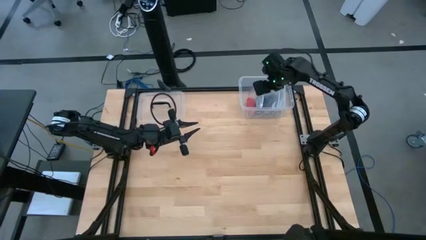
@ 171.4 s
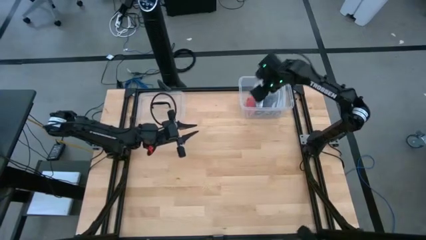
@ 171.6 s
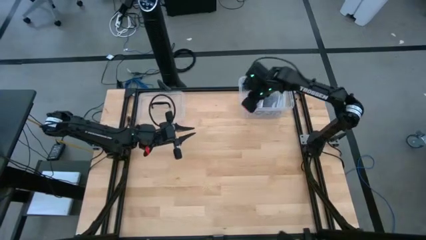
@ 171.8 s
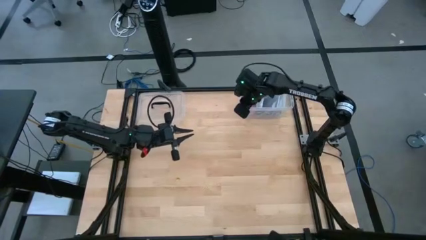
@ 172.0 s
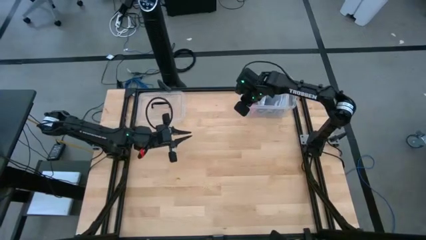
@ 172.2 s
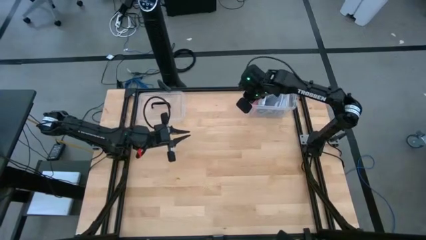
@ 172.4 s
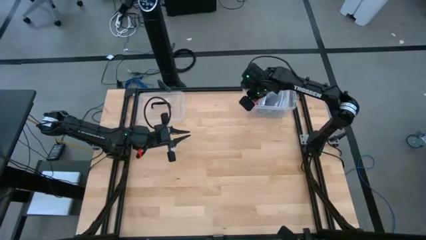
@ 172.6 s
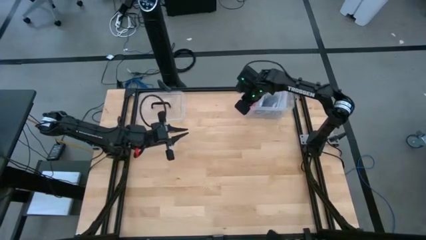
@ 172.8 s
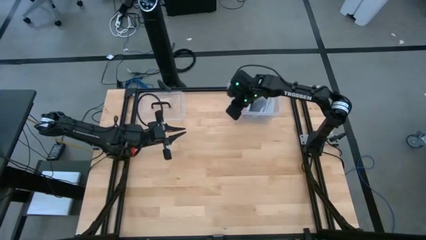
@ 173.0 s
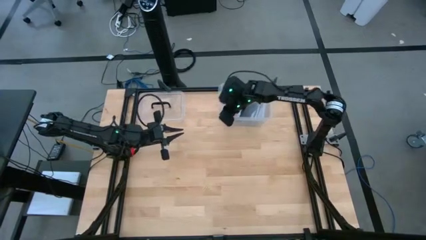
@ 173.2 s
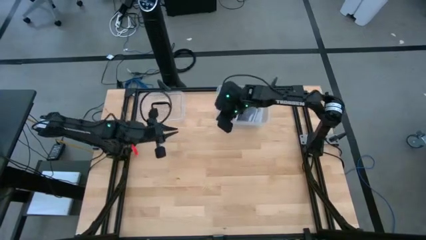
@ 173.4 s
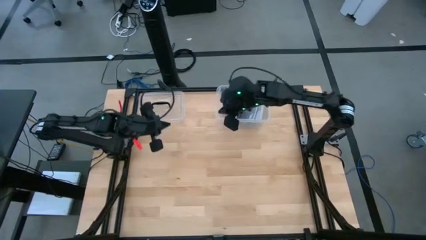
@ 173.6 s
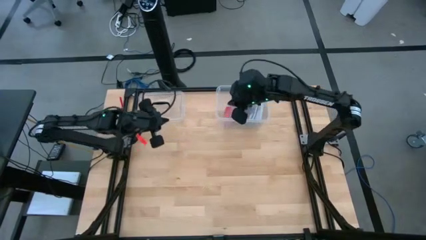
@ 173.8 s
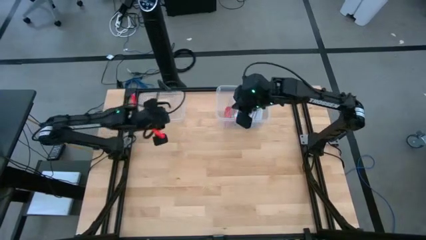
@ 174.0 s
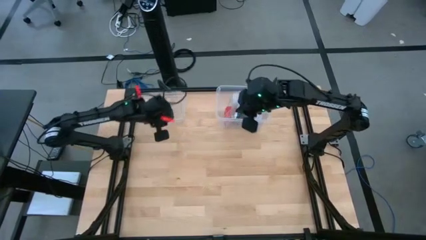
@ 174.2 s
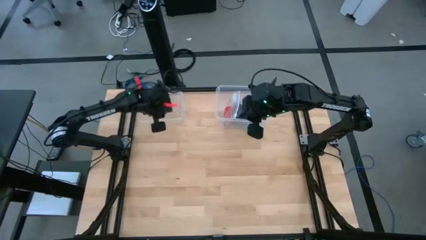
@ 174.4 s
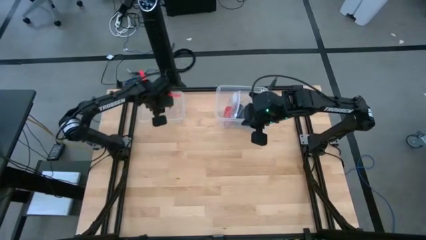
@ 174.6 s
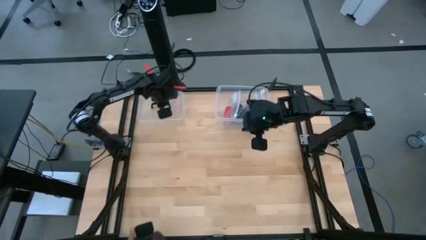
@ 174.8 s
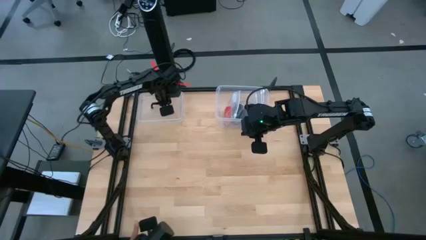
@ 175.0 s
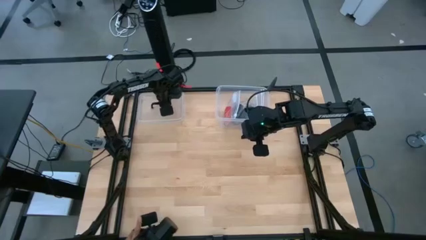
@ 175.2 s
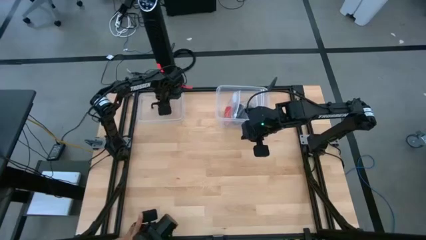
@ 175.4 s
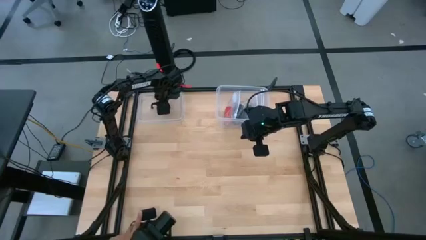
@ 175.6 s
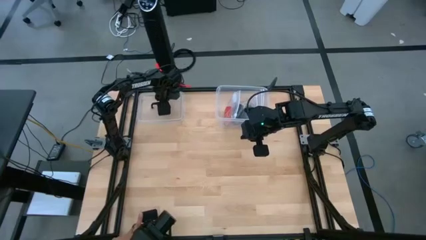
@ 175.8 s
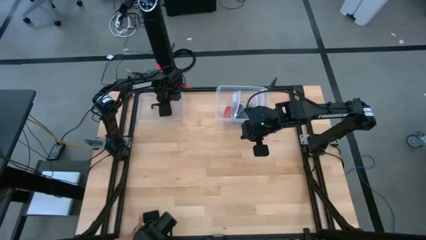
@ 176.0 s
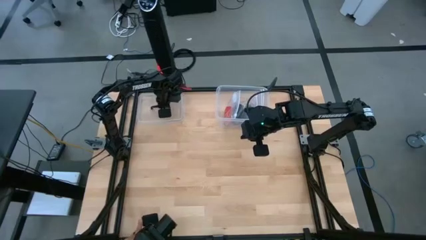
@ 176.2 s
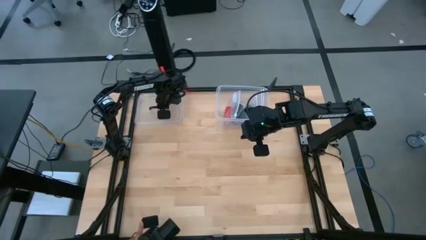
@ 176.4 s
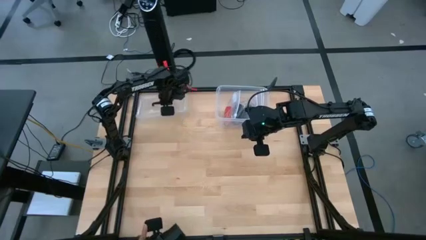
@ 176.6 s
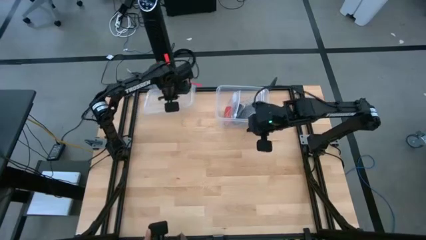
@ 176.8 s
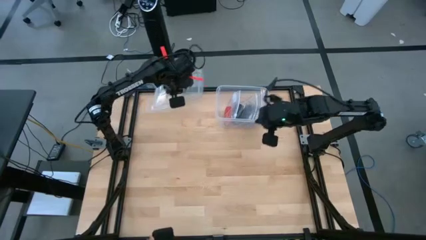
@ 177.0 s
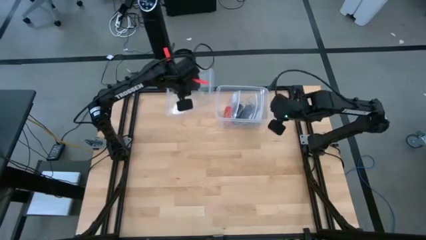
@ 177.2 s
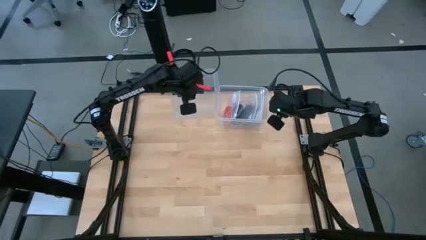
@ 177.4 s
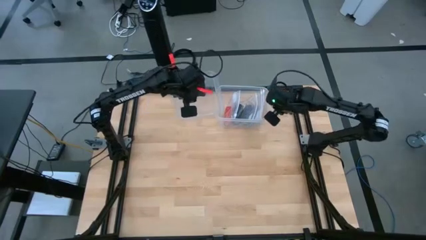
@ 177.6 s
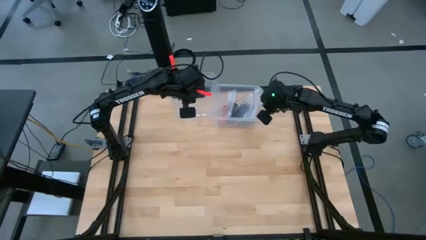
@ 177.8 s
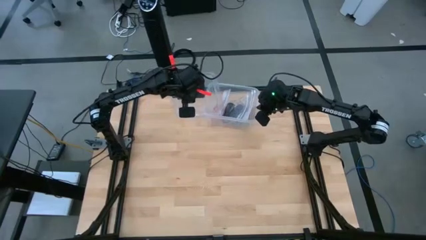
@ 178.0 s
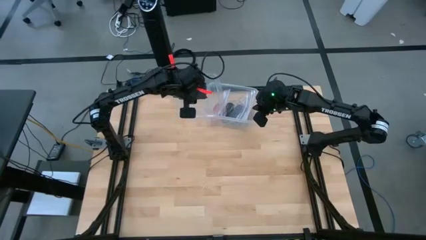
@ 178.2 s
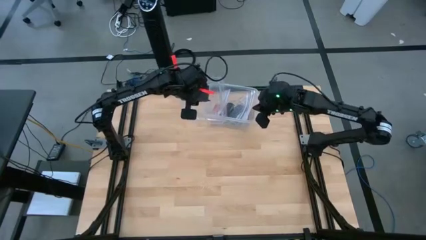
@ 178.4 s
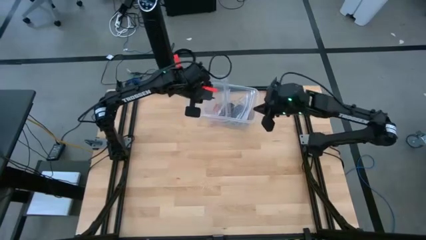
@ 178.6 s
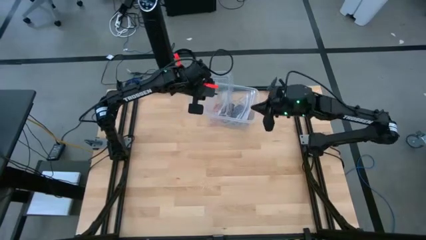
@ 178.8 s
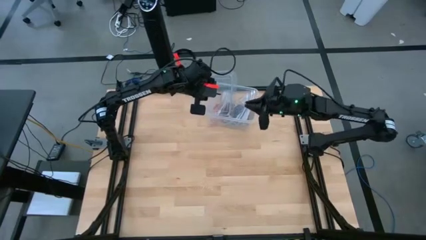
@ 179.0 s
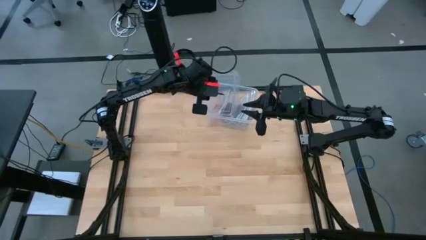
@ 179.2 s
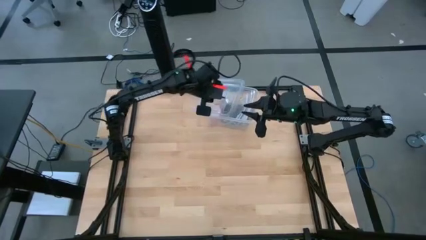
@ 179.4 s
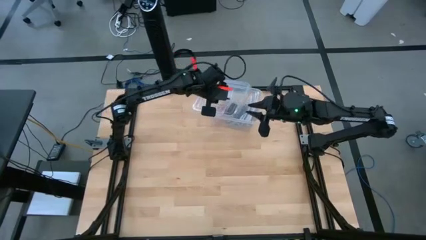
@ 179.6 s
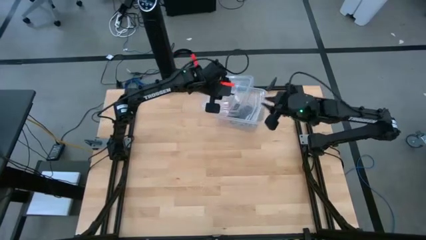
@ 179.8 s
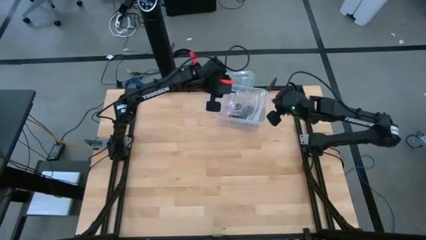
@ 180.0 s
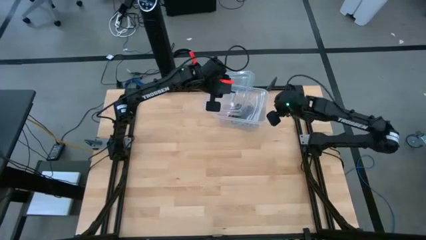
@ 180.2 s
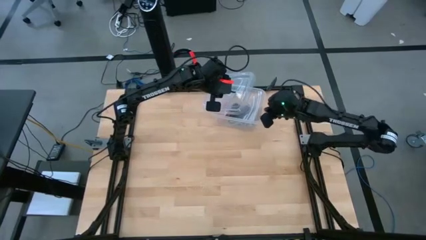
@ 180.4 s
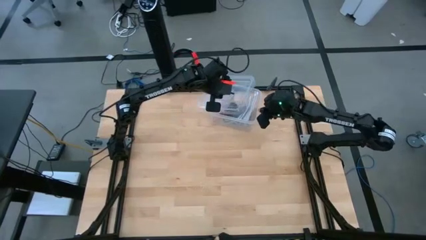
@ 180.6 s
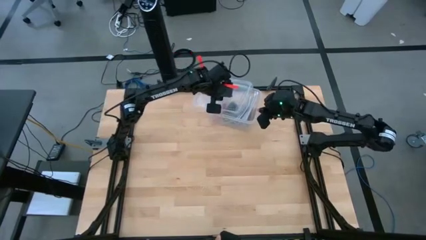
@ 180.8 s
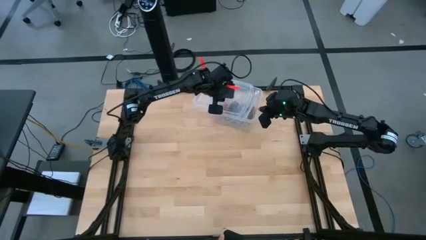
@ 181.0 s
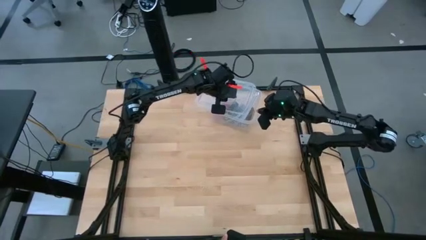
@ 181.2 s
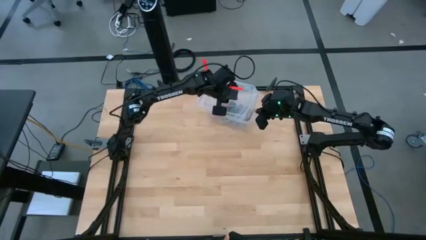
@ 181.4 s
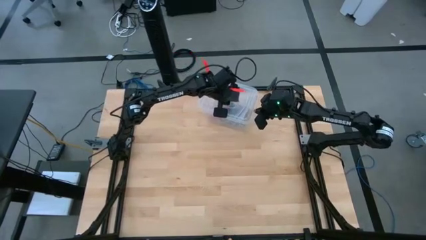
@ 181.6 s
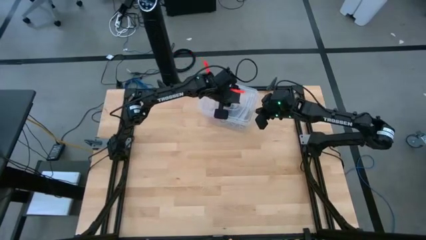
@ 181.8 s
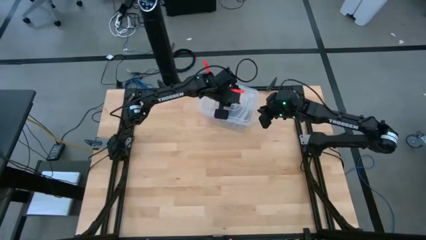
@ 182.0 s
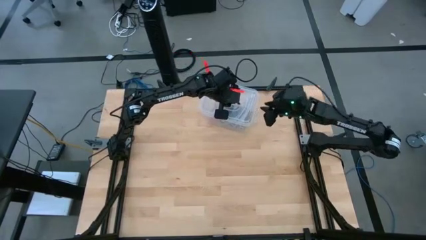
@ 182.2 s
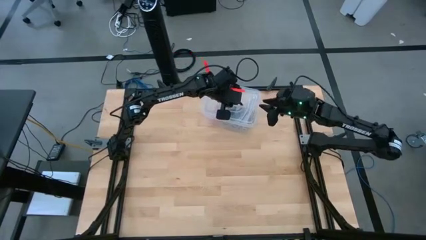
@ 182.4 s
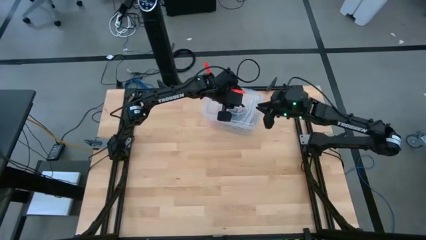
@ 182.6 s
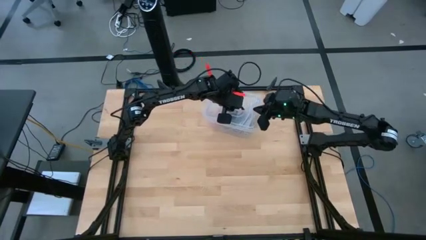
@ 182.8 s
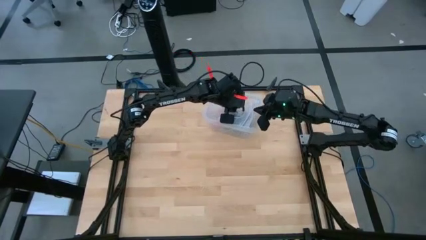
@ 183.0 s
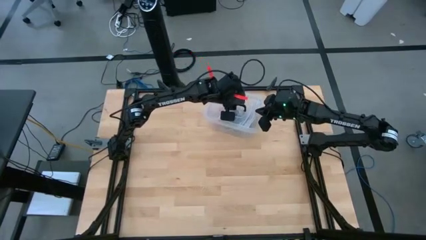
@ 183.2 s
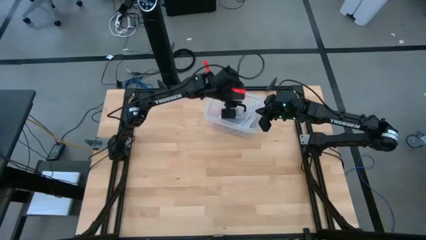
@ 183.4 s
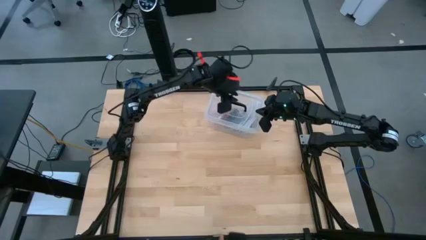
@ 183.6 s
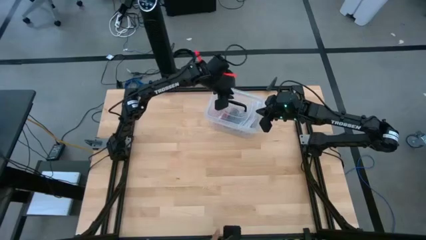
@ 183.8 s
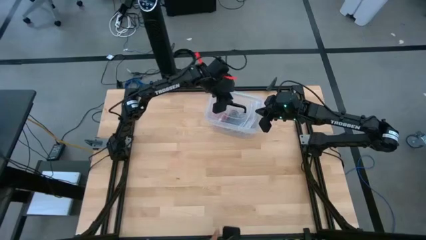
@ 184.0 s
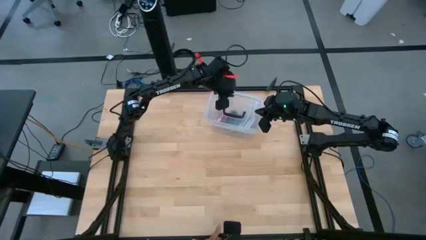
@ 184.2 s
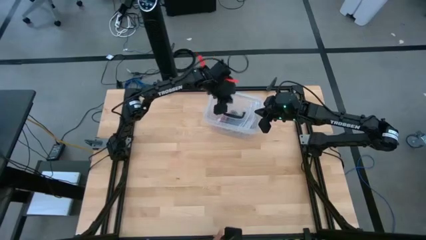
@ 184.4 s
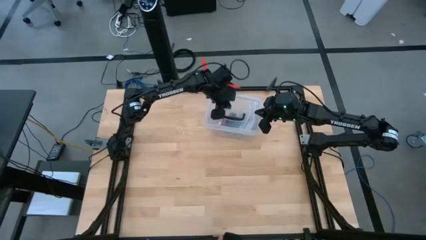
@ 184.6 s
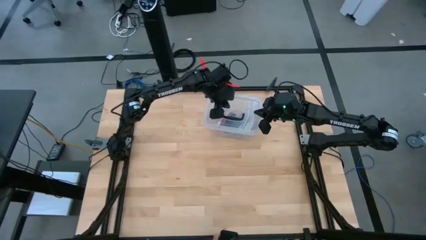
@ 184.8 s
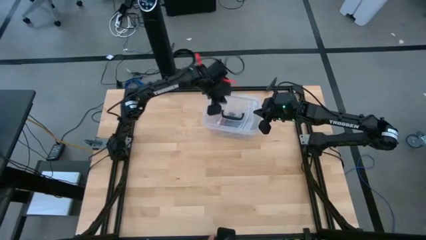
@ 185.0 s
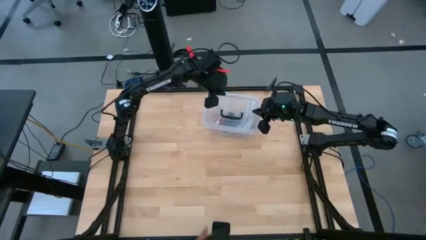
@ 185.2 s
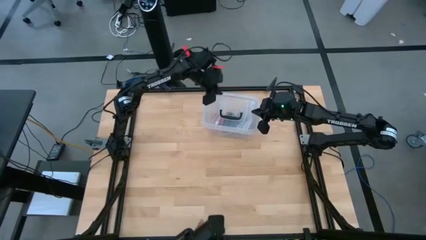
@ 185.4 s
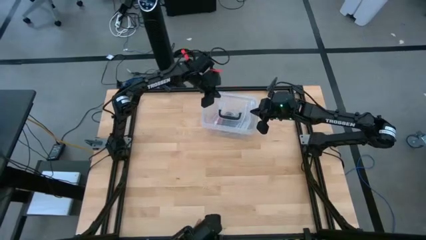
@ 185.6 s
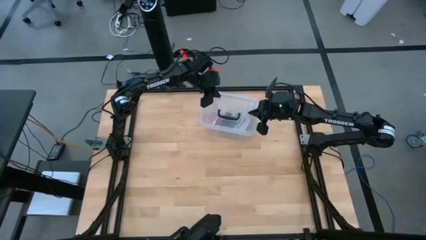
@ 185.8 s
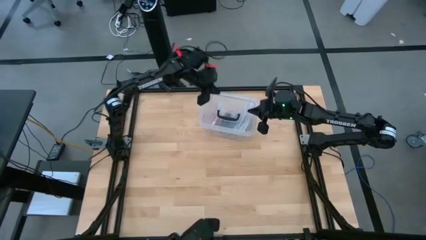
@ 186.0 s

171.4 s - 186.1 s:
Task: Roll bandage
Close the transparent bin

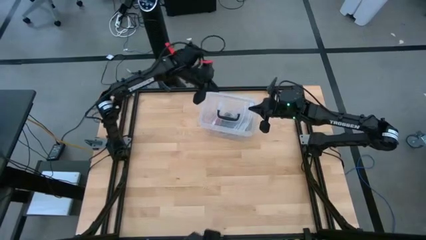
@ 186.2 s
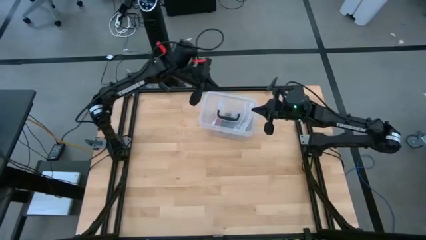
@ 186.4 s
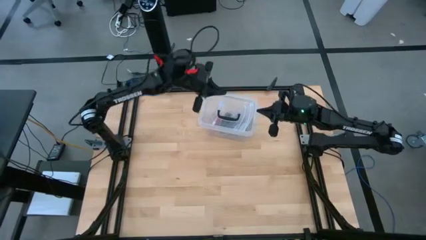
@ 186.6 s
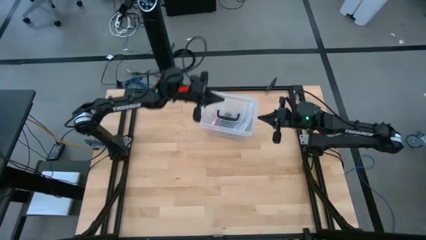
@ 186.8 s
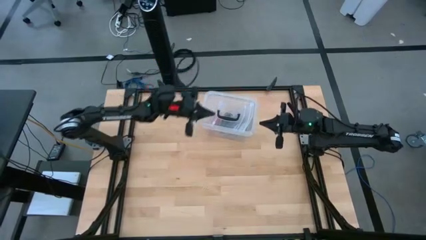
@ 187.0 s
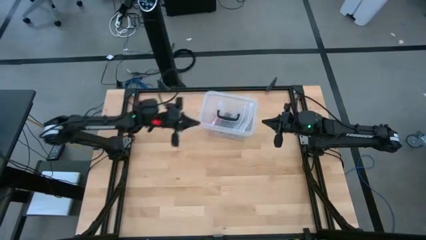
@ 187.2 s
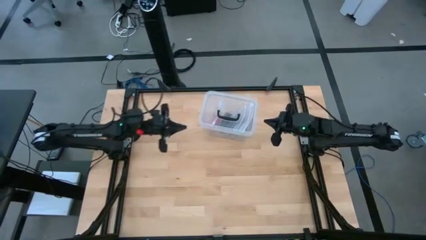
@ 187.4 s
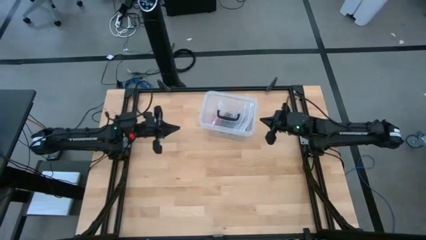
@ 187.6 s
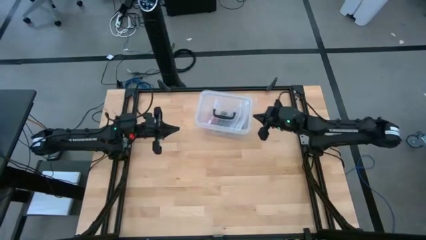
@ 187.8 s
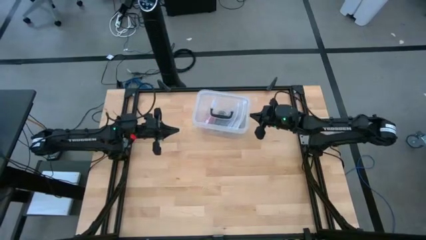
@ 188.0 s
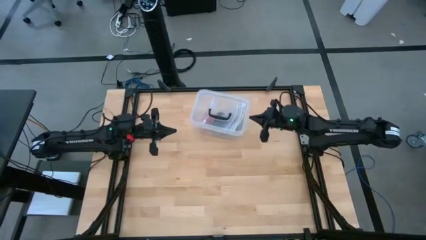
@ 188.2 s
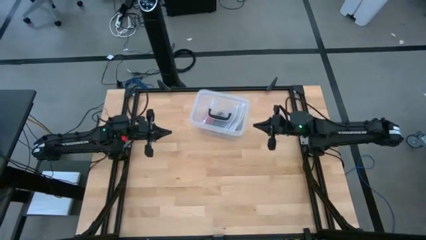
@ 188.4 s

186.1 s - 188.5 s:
Adjust the transparent bin
